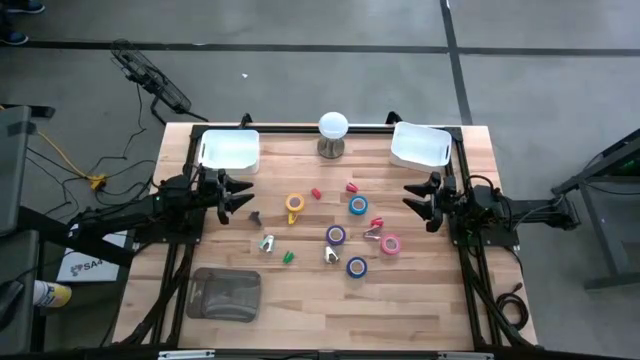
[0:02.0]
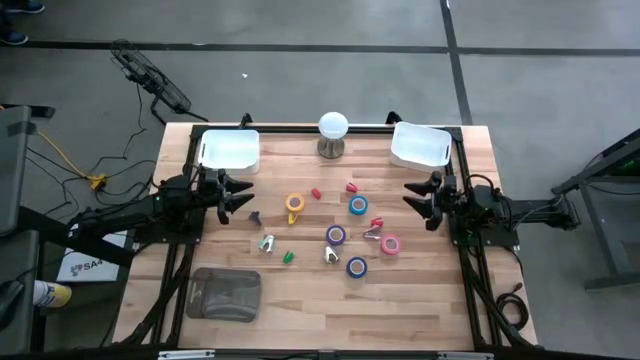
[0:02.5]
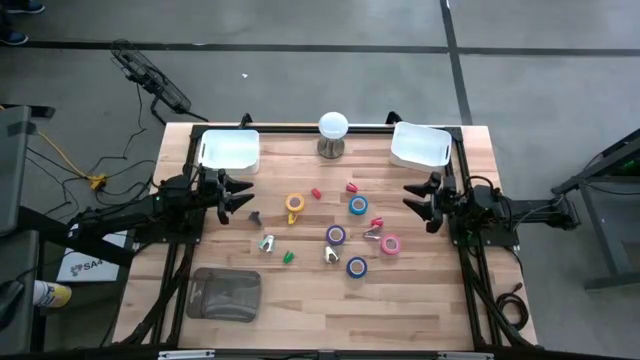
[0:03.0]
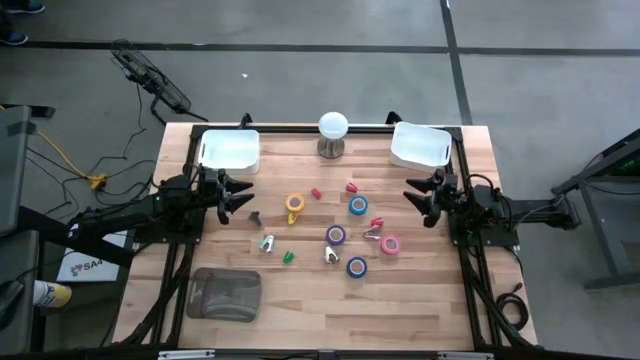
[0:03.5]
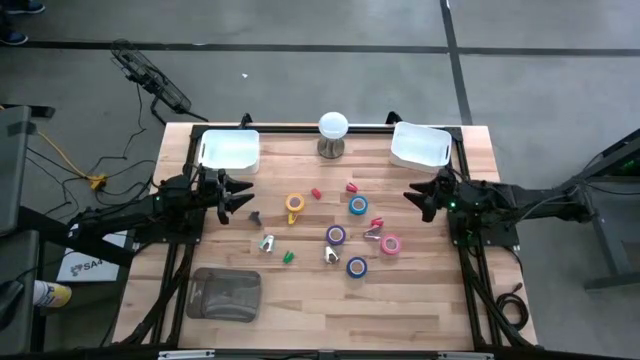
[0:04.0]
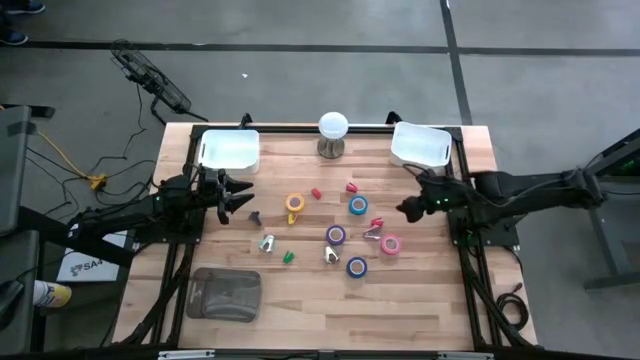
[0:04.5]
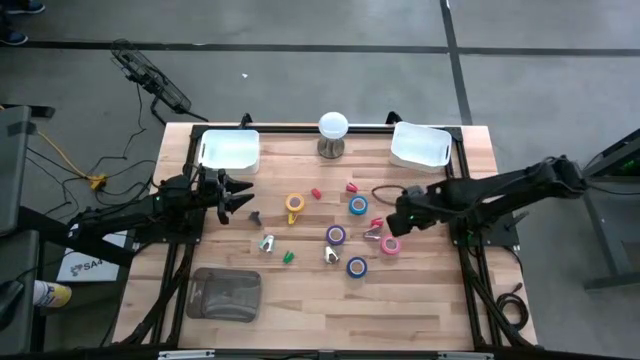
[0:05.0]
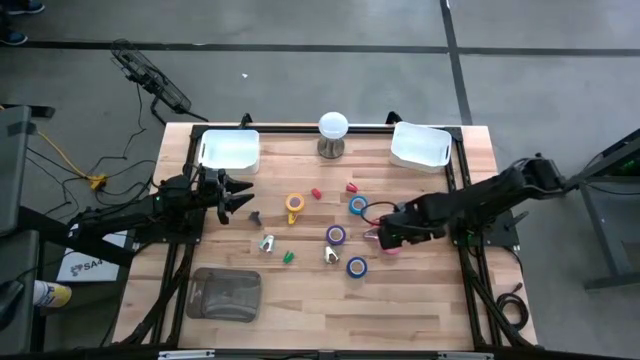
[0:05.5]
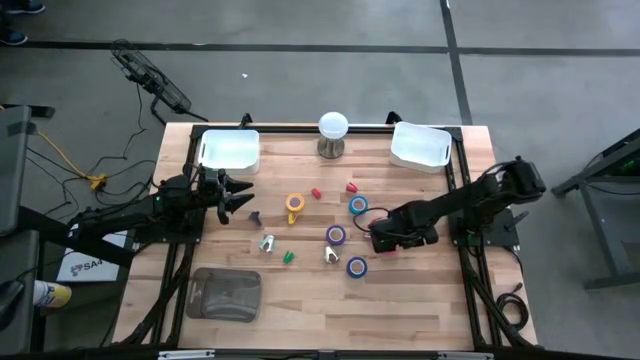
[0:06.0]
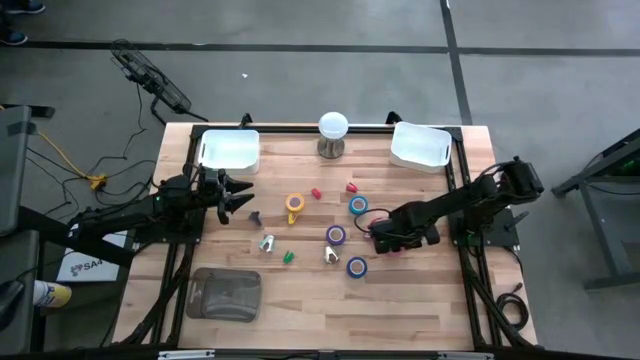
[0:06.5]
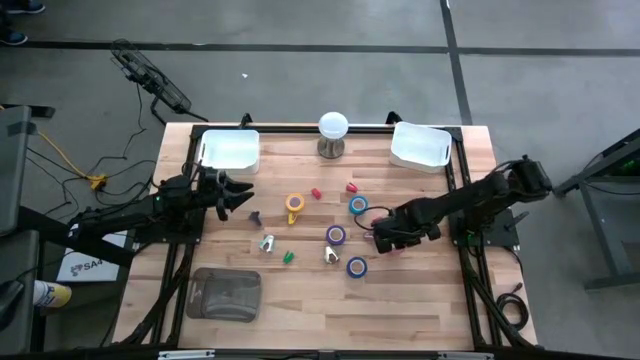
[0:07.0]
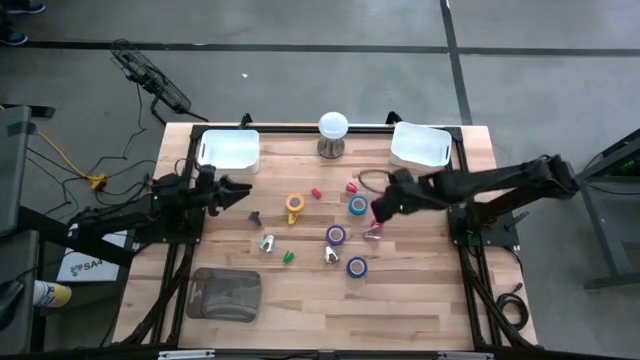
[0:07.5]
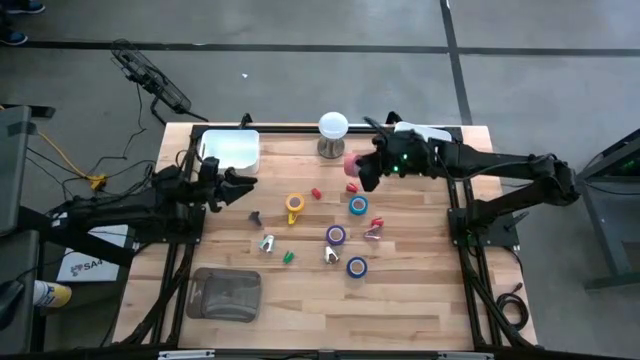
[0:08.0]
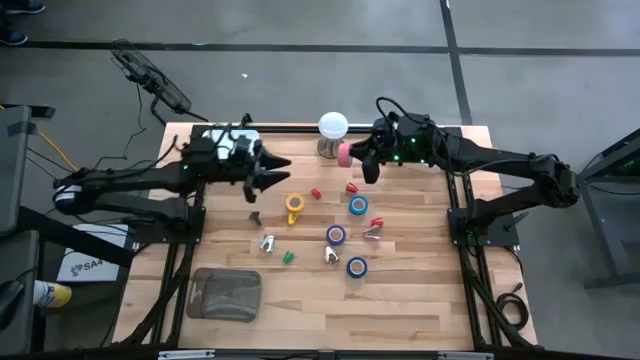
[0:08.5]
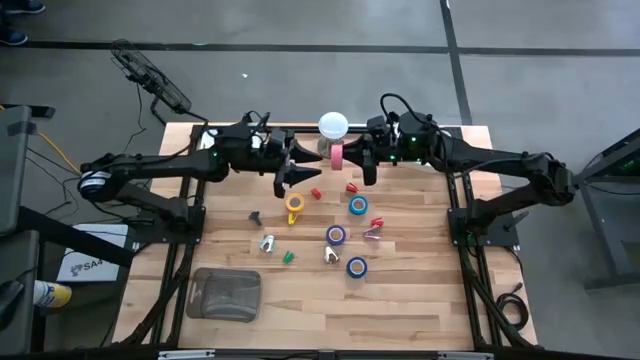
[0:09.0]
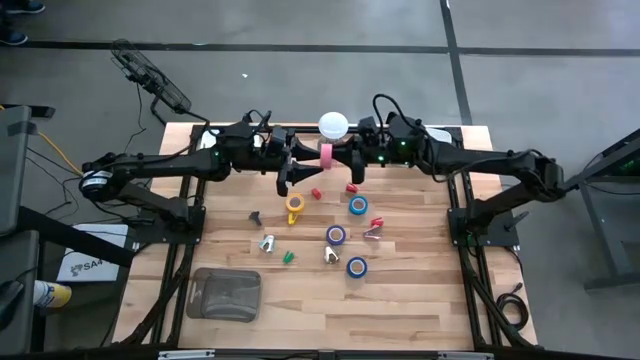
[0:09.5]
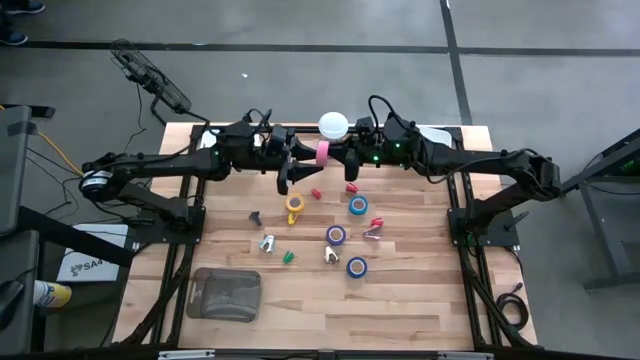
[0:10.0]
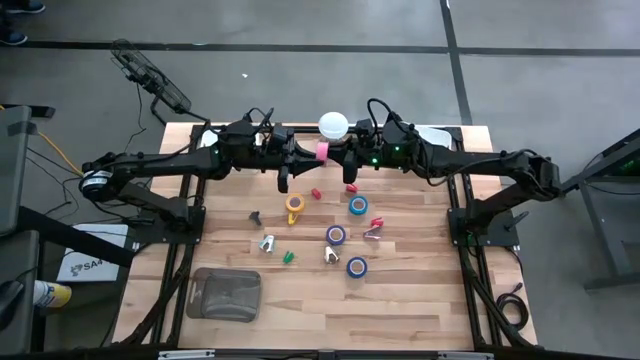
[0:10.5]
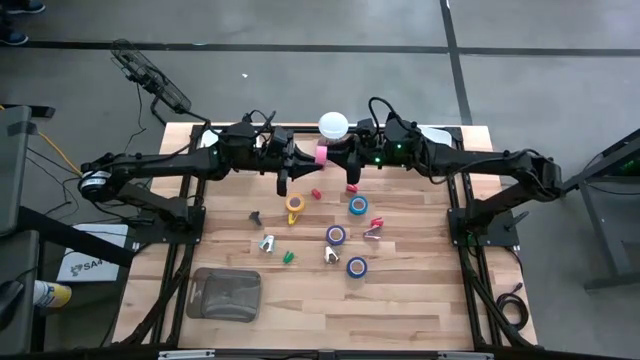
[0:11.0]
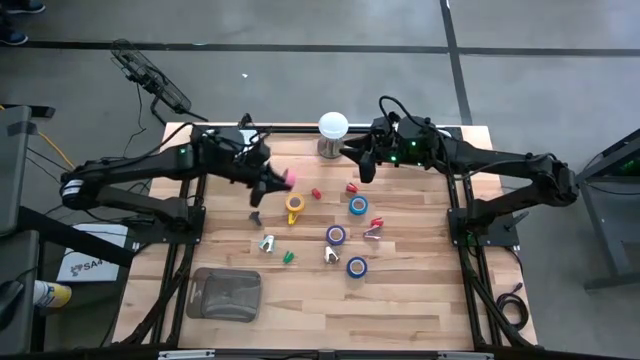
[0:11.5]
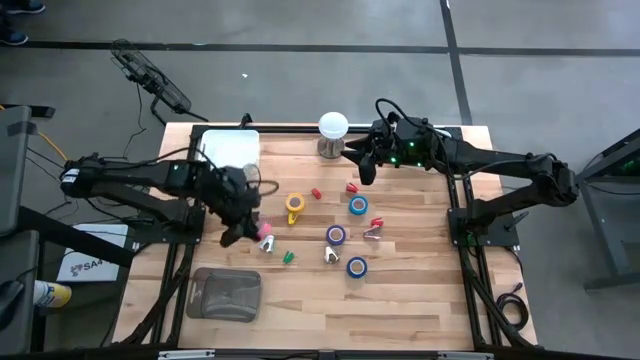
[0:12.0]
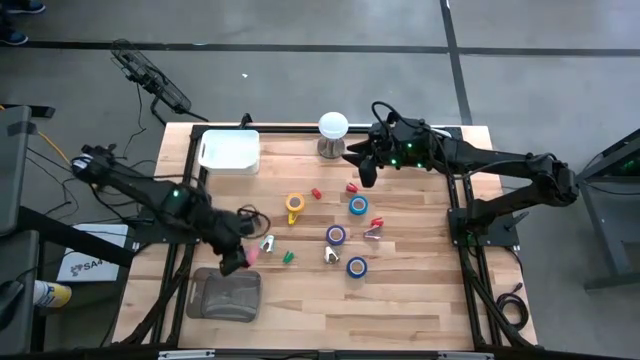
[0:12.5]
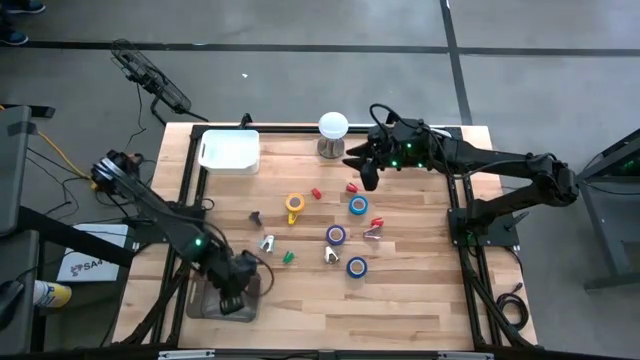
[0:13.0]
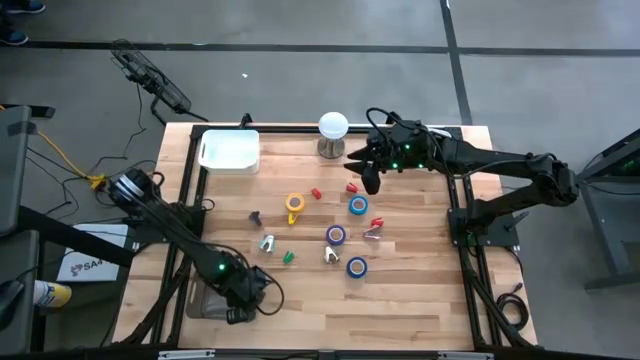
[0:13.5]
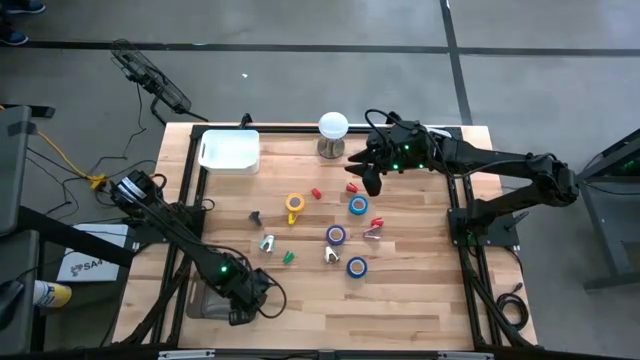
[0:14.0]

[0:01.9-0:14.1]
Task: Pick and place Stapler, Stapler remover, tape
Put the pink tape into the black bin

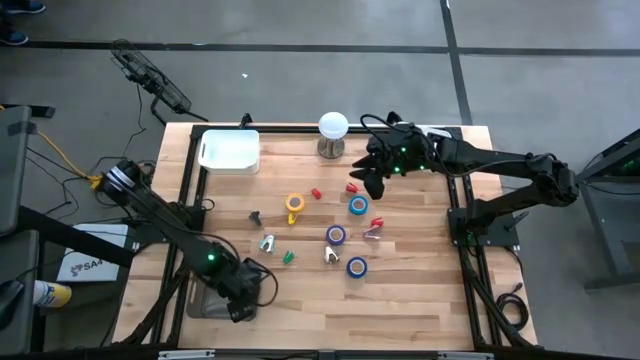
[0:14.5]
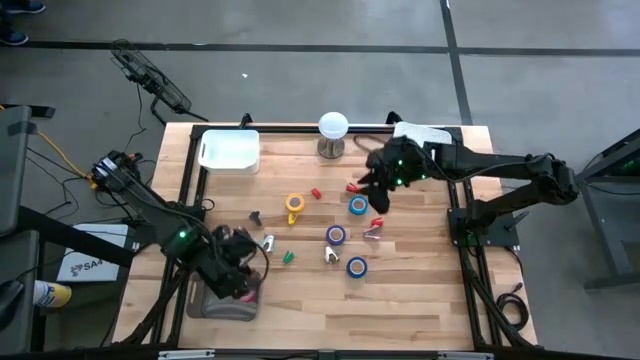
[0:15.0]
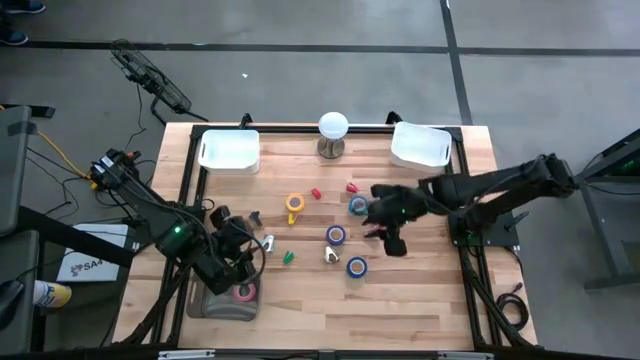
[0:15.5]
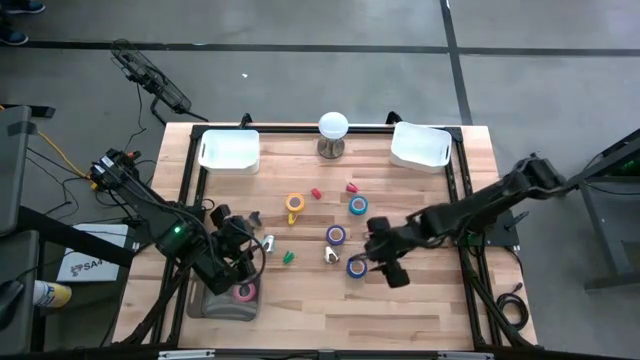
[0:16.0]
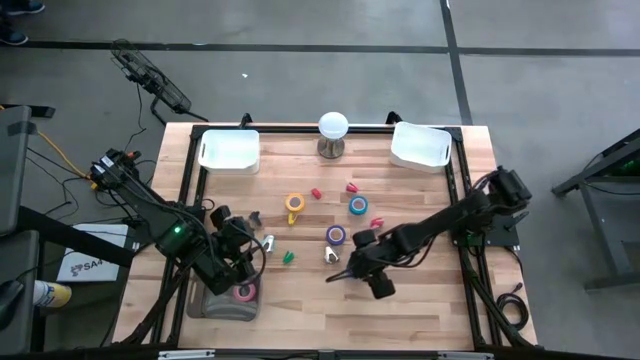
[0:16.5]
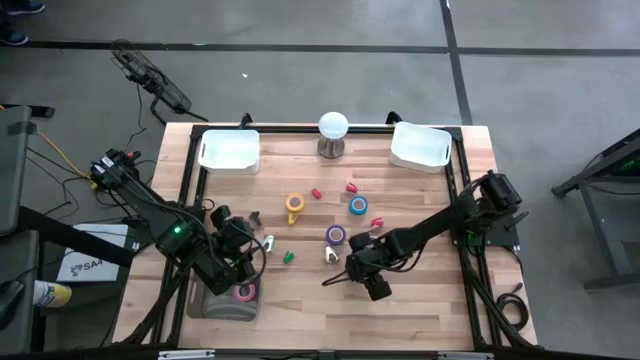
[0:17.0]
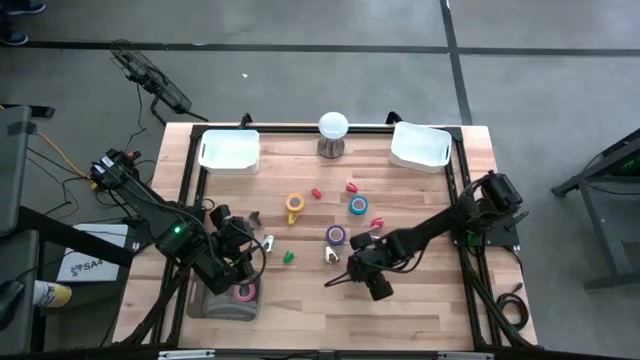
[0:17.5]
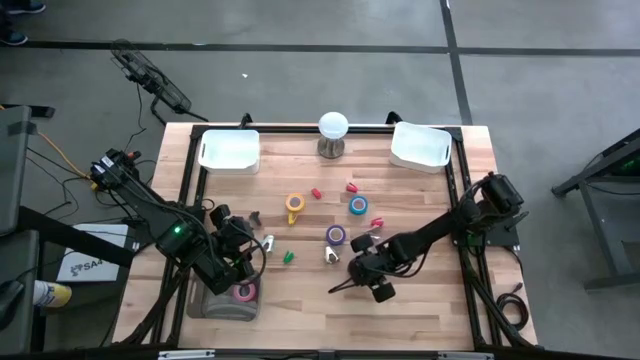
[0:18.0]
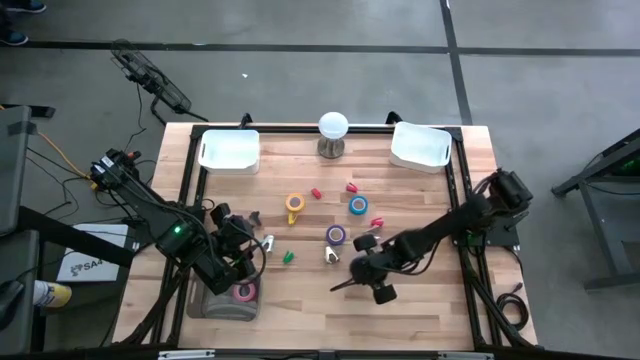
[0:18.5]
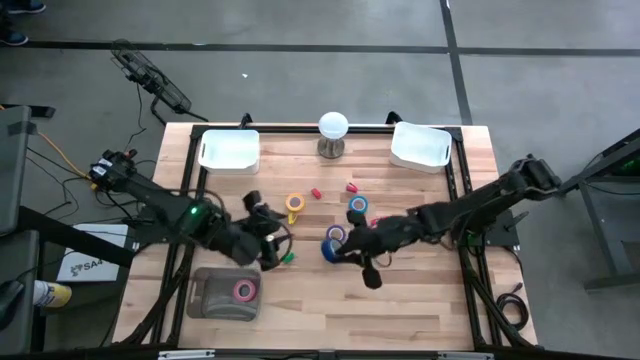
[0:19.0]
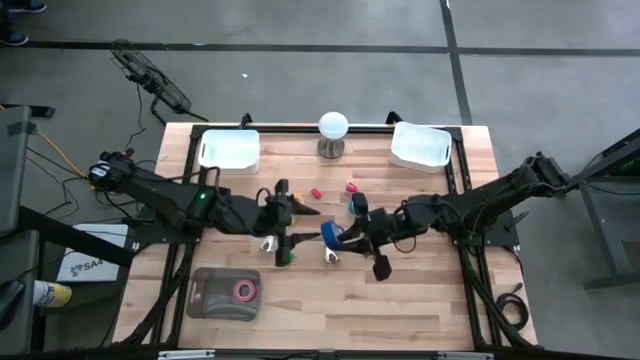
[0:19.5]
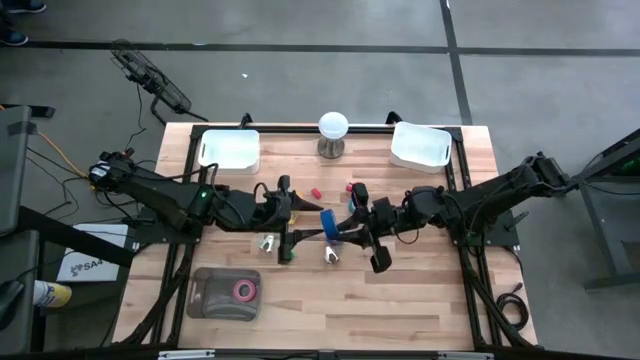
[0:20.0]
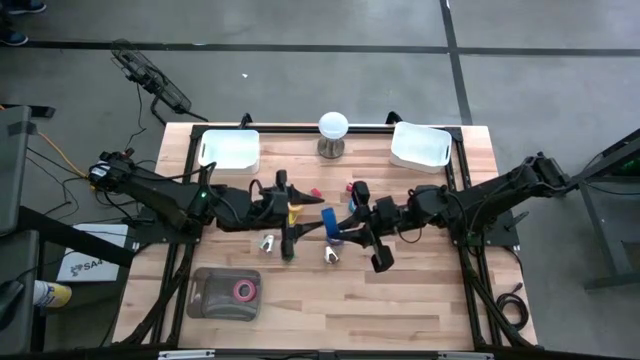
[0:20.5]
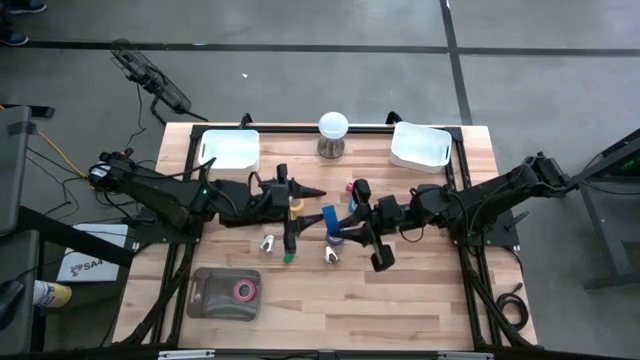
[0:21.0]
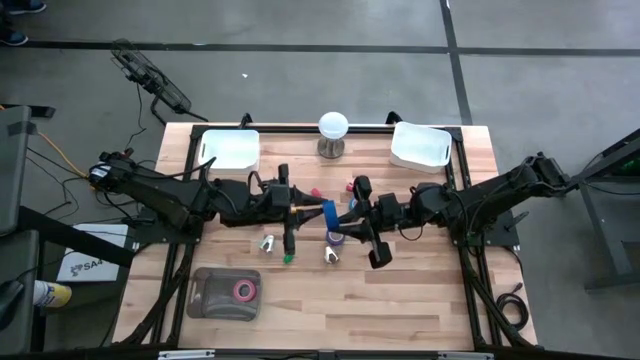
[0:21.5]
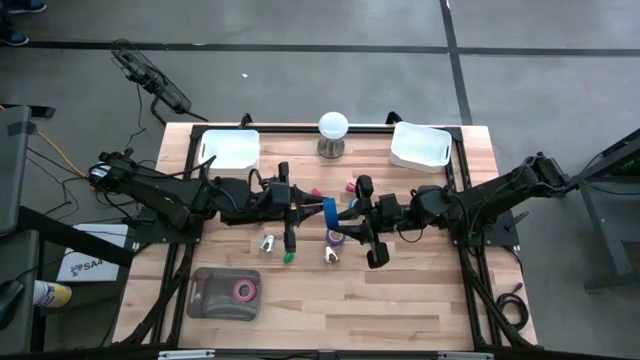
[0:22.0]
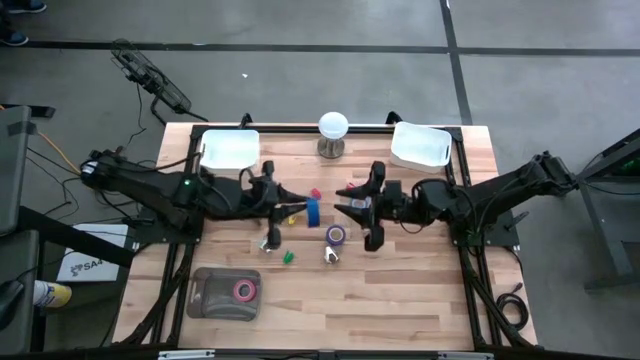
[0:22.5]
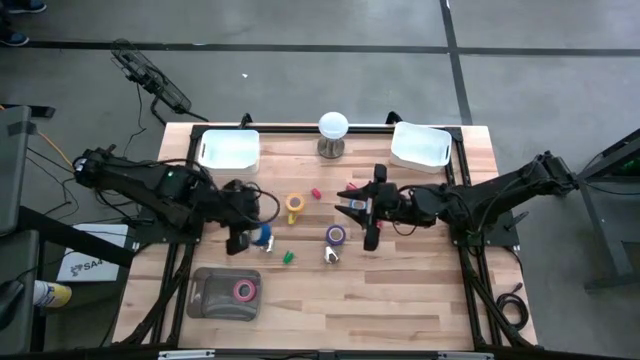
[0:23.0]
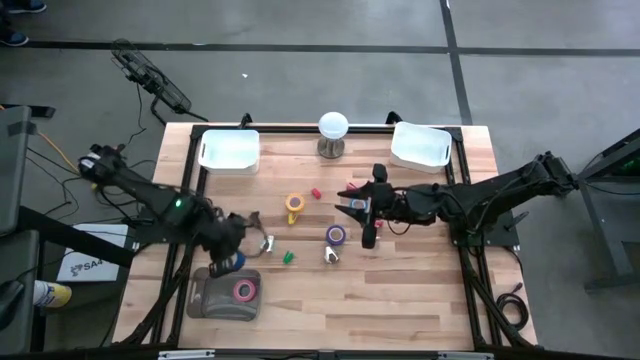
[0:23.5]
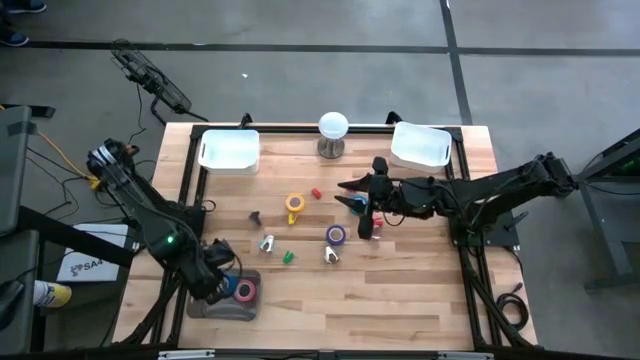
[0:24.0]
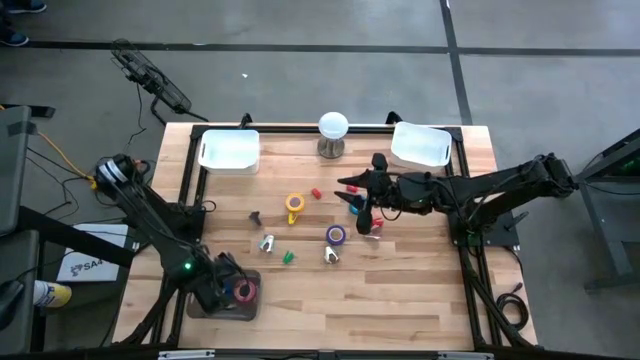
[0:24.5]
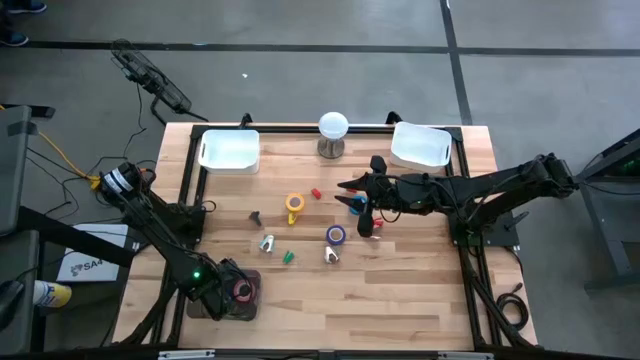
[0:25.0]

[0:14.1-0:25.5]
Put the bottom dark blue tape into the black bin
